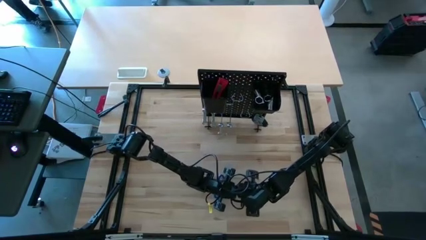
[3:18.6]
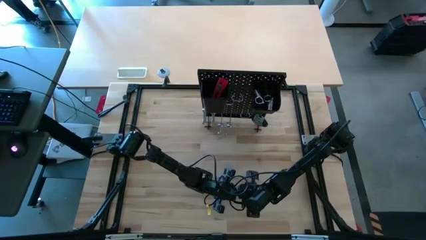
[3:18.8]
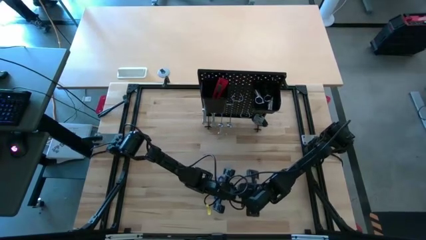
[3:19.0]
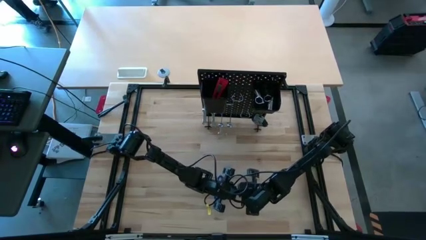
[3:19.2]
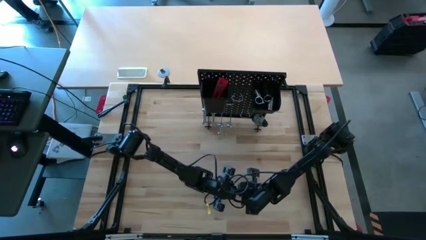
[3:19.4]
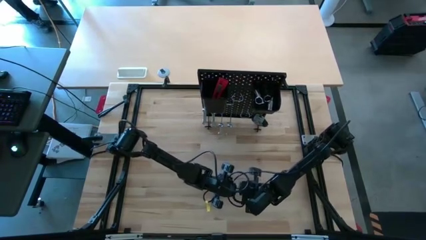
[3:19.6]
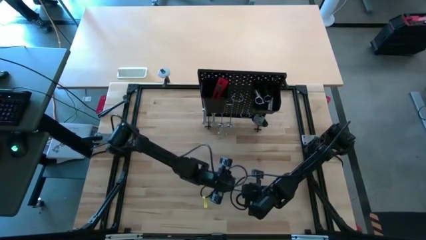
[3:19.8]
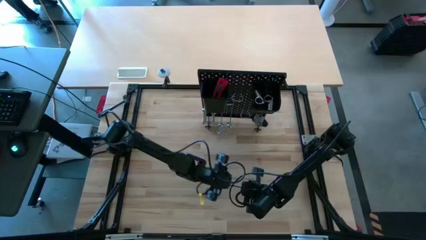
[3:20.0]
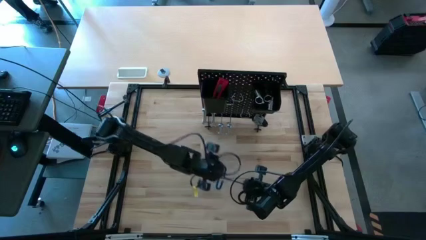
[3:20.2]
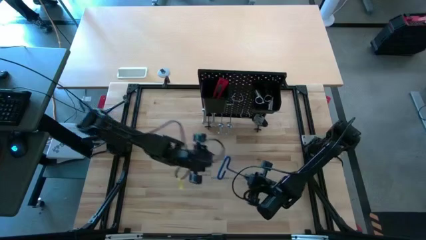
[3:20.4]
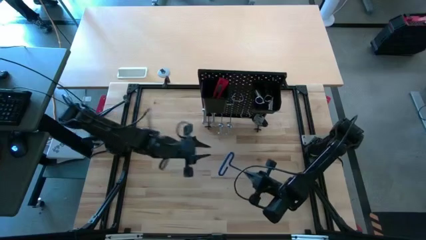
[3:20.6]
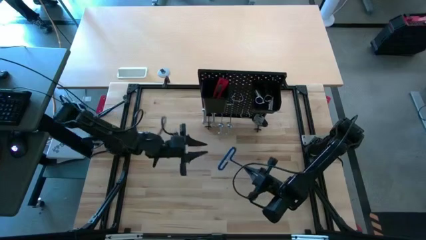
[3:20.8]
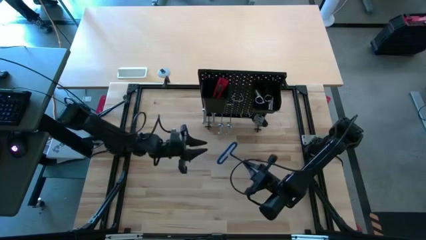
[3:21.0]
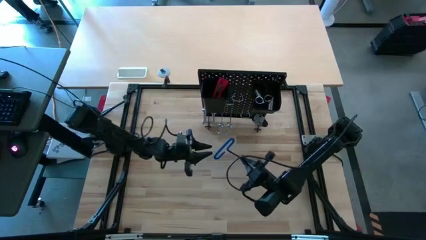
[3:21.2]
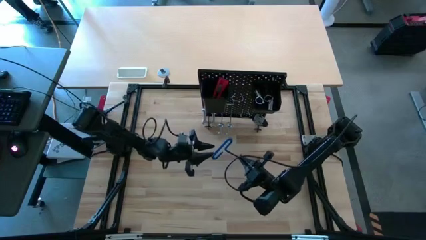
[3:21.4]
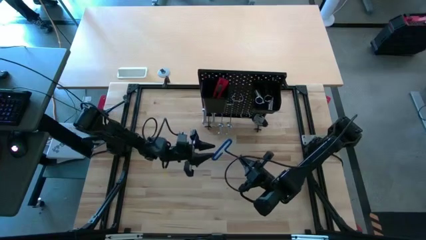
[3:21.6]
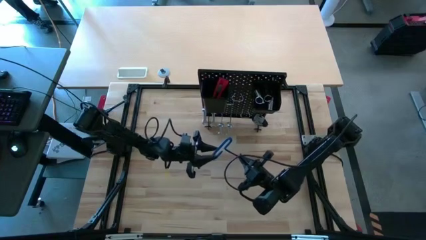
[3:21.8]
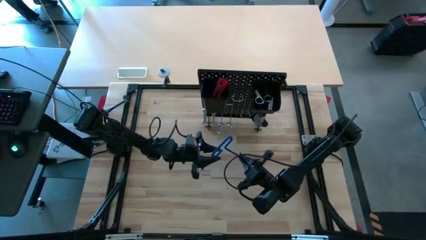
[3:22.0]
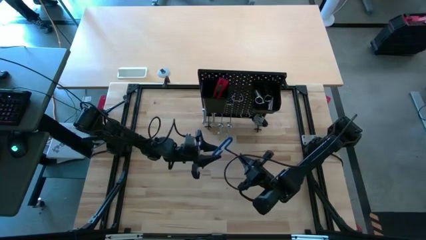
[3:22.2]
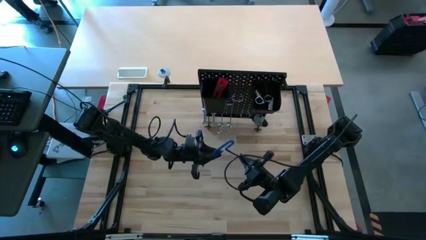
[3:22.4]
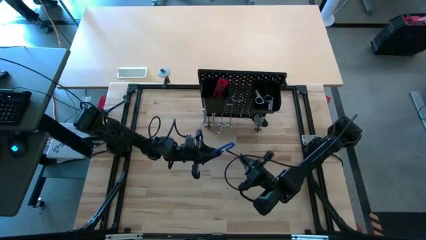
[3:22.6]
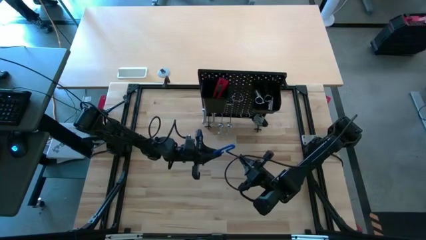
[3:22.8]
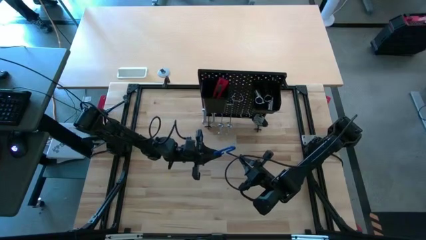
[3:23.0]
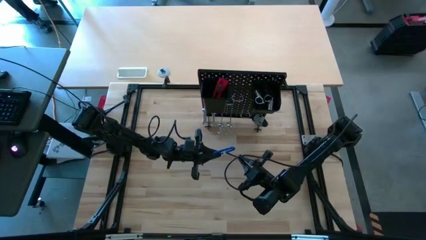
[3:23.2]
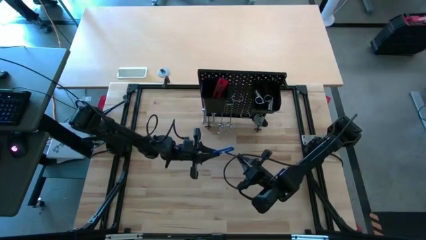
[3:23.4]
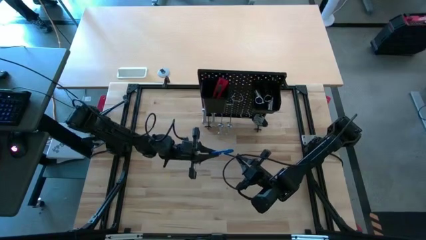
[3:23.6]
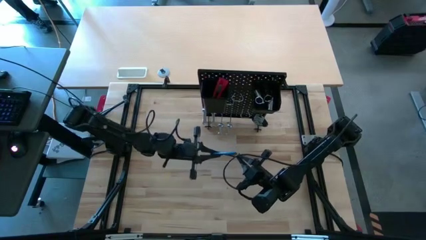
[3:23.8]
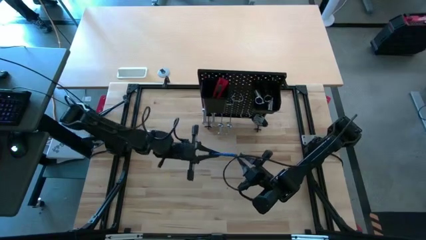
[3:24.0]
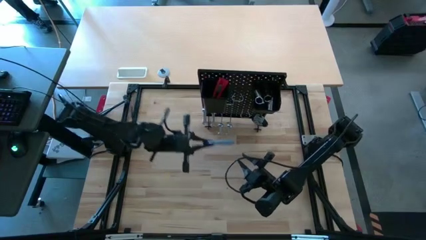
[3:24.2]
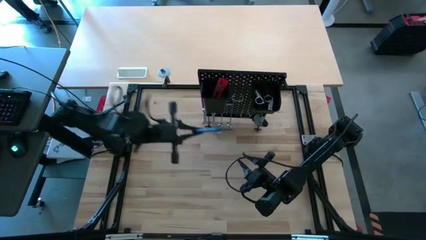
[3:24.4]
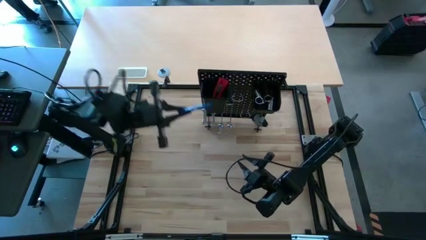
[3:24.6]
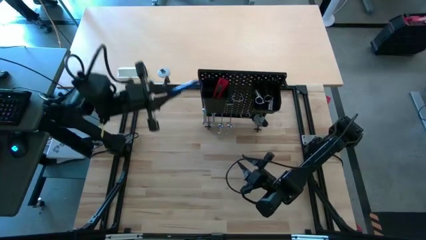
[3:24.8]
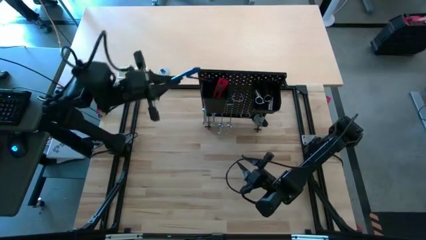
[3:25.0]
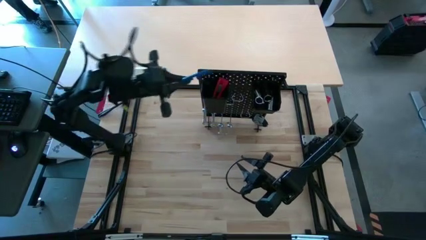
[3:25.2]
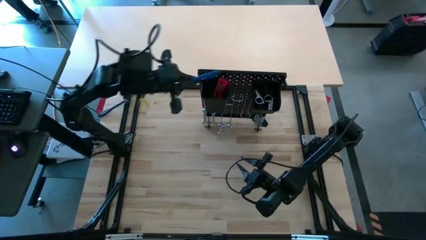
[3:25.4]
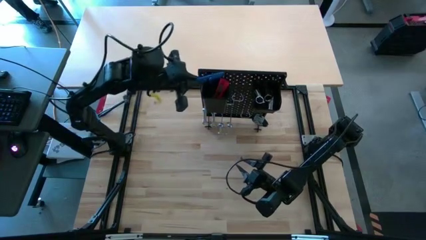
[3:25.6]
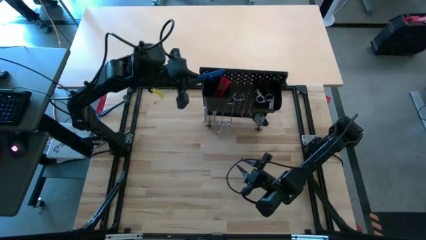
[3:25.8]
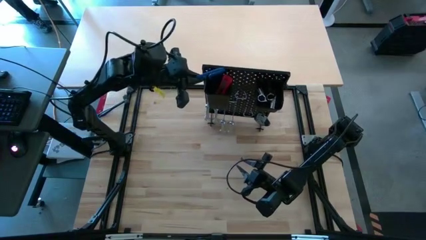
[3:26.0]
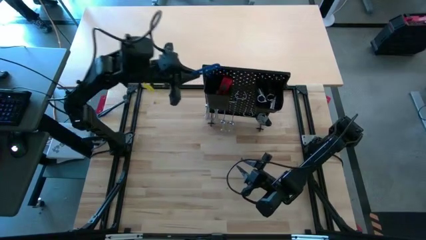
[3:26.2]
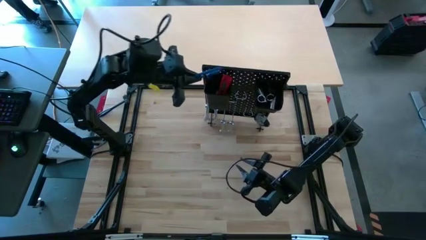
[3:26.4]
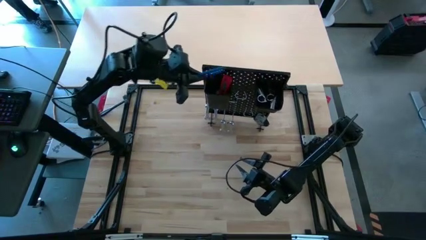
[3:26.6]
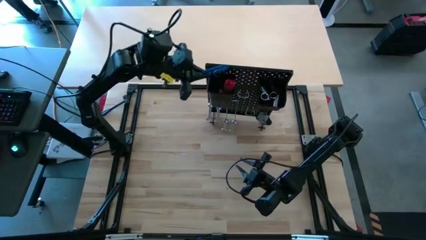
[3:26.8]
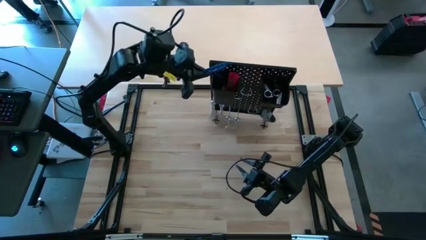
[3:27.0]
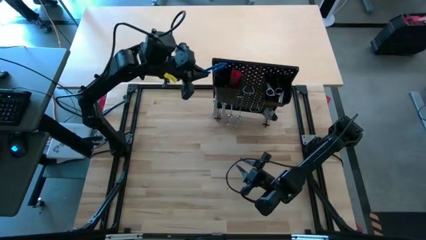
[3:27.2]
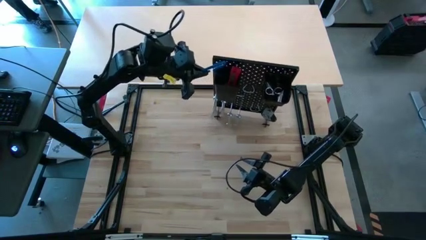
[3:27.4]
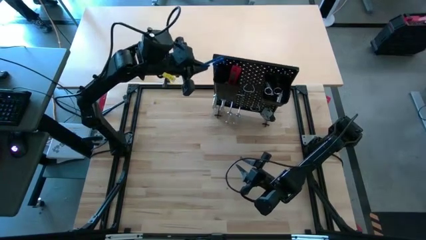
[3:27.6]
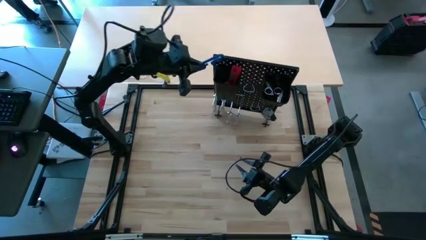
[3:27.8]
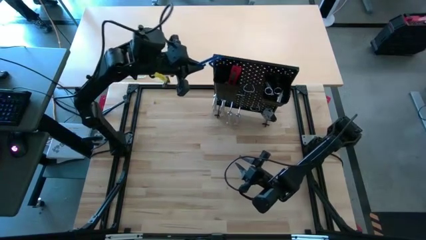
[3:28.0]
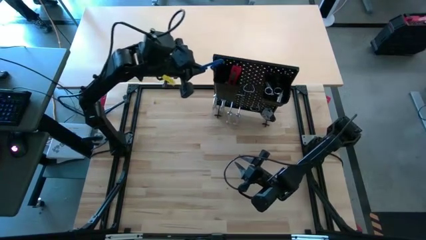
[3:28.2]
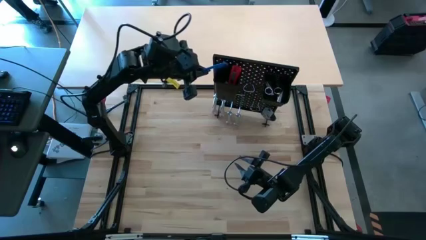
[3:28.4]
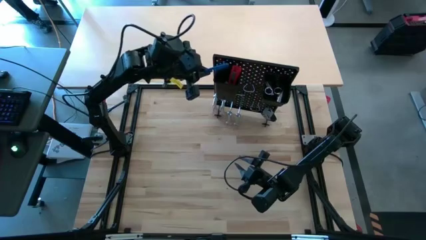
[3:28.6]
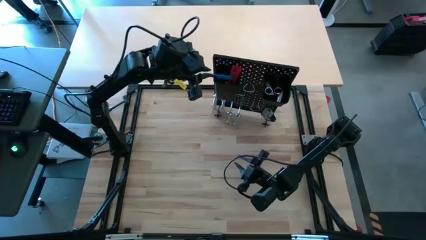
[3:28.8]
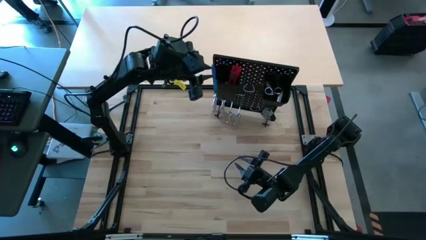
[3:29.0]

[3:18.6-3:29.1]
Task: Hang tools onto peg board
Put the pick tool into the peg board

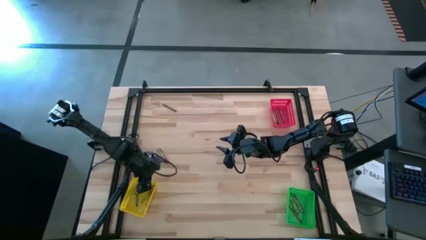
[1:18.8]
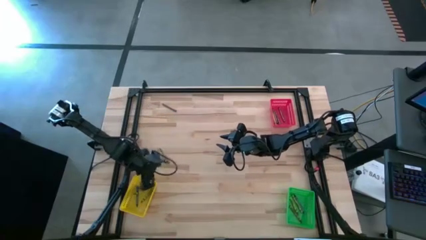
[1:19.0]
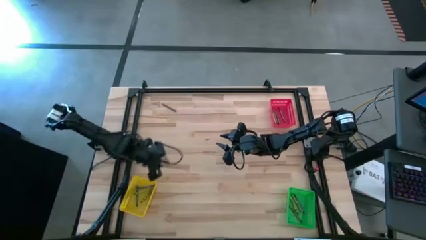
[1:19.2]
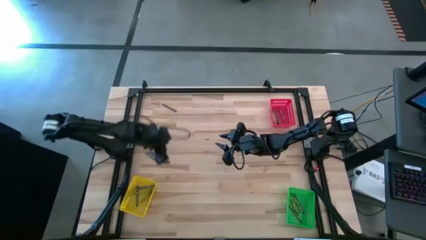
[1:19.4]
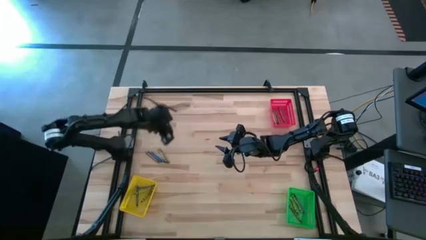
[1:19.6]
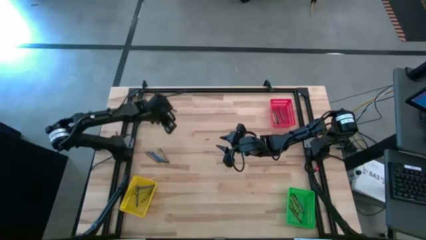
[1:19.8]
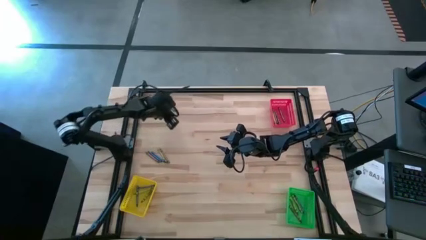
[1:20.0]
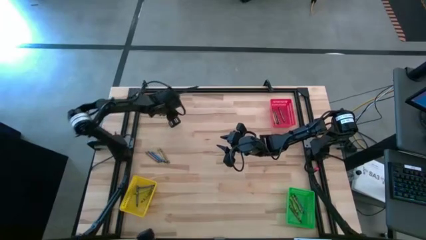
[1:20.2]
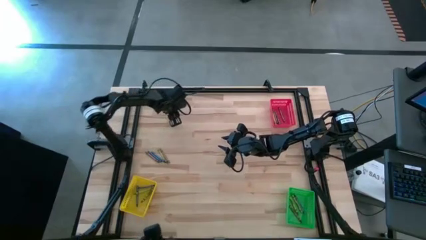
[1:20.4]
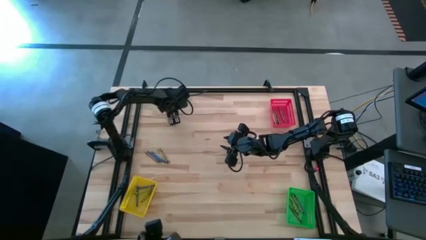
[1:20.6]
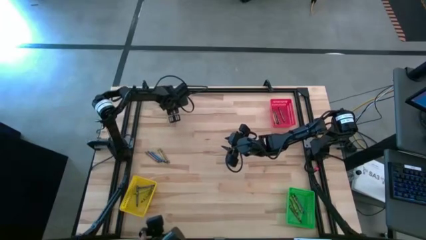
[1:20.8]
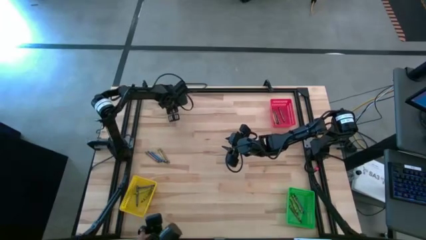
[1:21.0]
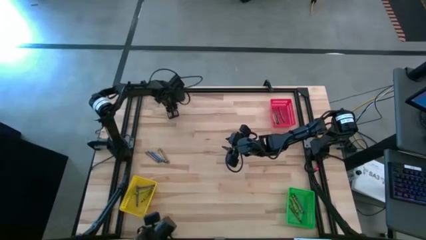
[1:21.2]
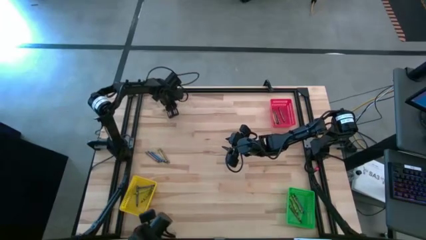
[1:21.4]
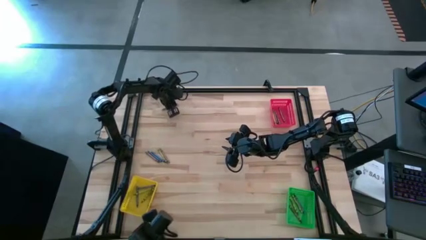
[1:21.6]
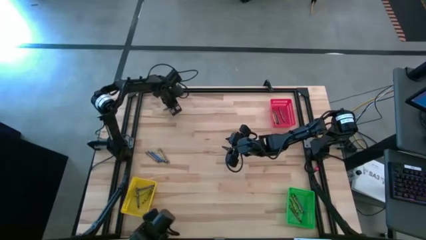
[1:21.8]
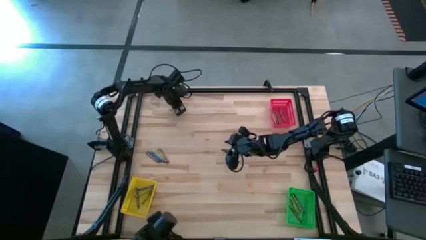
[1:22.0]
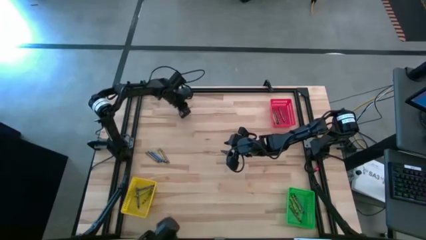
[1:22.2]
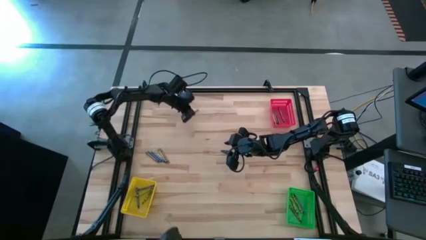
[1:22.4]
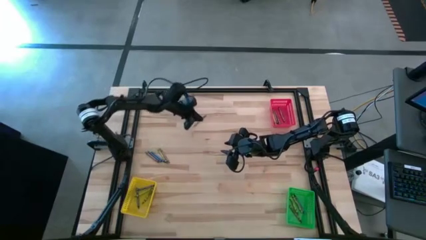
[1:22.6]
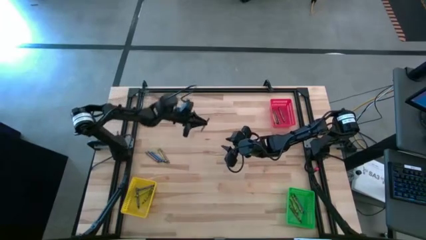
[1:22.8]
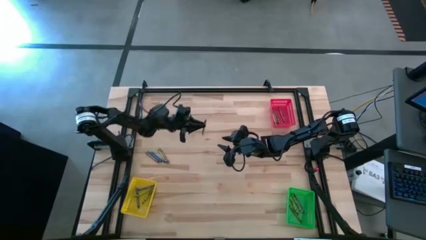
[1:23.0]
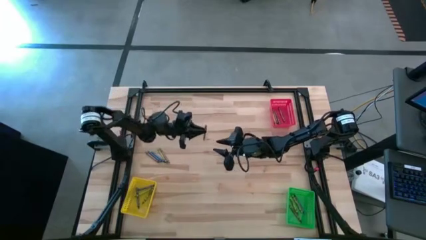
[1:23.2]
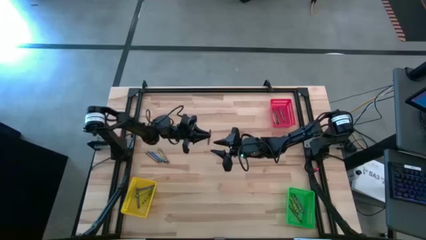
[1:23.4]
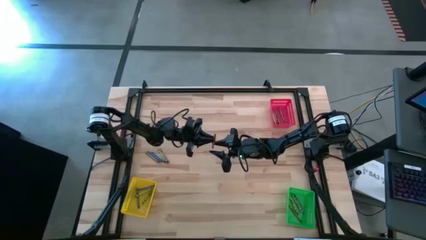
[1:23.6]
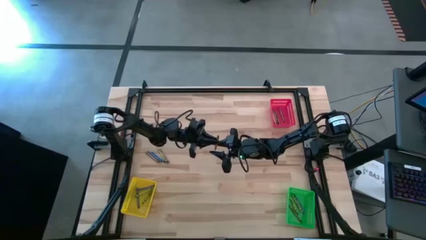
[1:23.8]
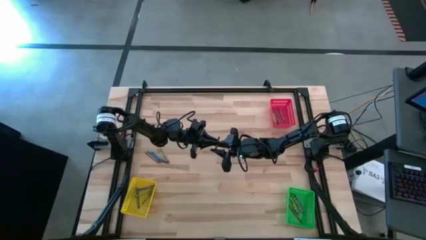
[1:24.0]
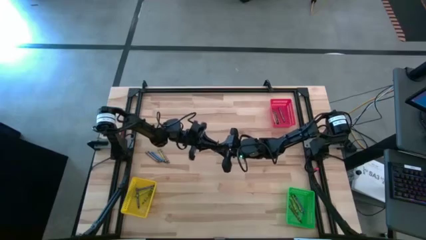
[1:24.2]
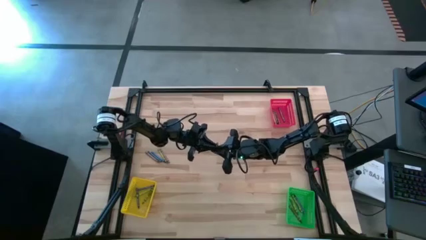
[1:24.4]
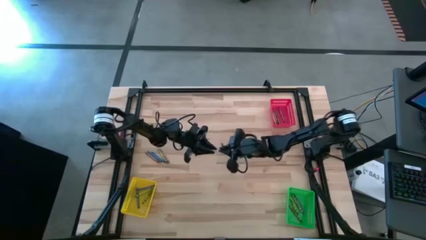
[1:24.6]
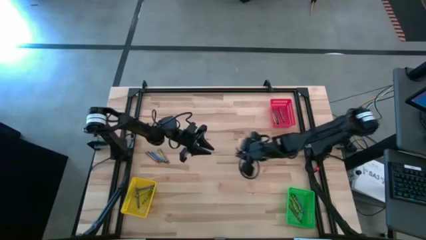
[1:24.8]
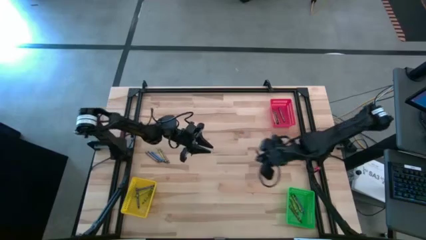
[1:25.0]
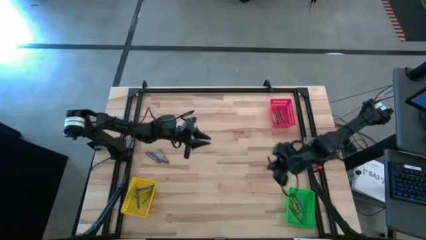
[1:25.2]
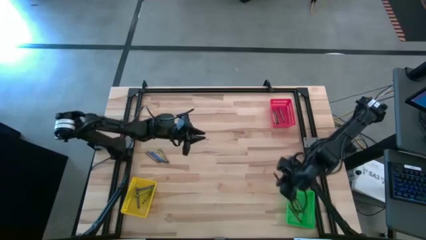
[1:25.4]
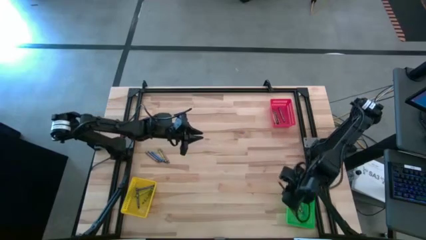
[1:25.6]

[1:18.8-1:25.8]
Task: Sort crayons
Put the brown crayon into the green bin
